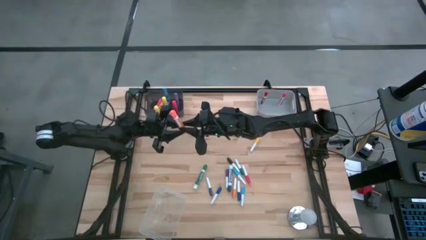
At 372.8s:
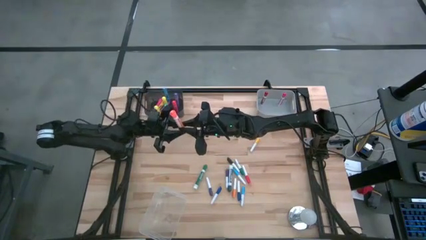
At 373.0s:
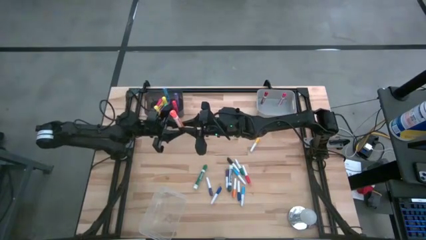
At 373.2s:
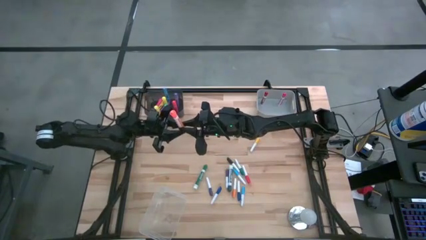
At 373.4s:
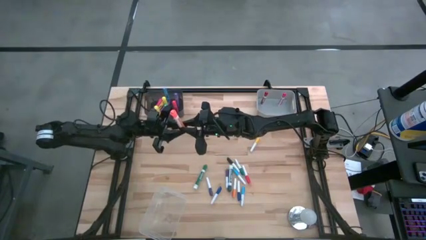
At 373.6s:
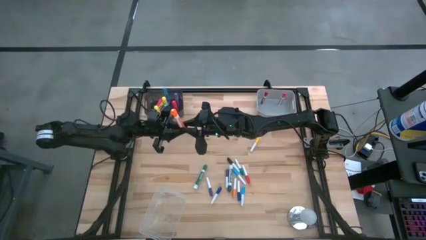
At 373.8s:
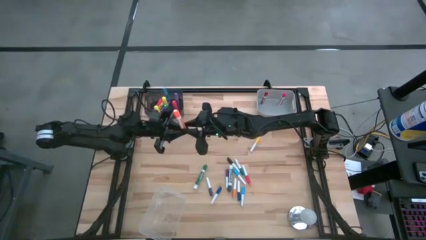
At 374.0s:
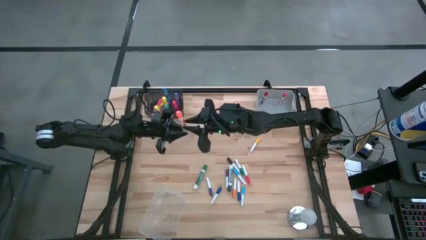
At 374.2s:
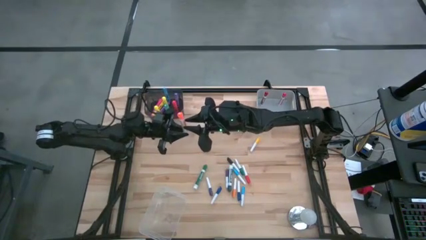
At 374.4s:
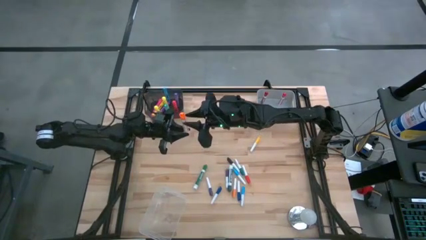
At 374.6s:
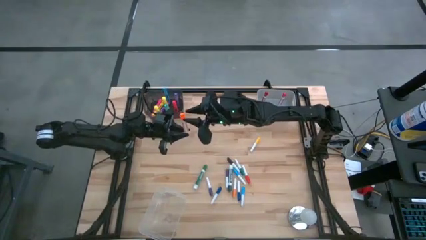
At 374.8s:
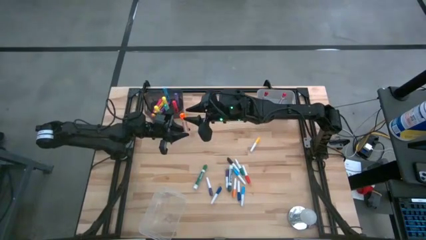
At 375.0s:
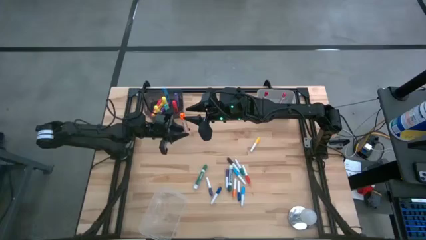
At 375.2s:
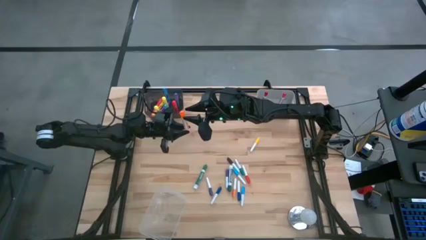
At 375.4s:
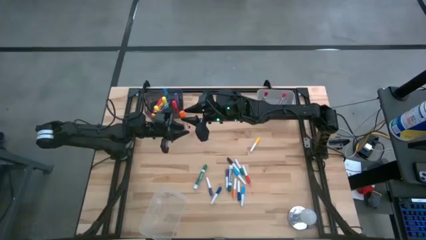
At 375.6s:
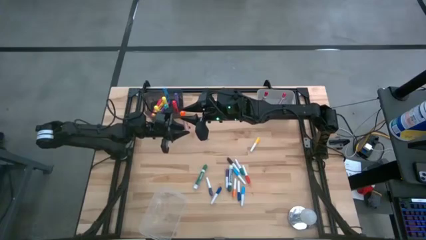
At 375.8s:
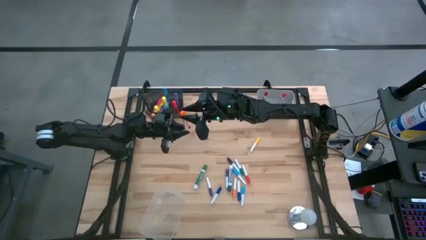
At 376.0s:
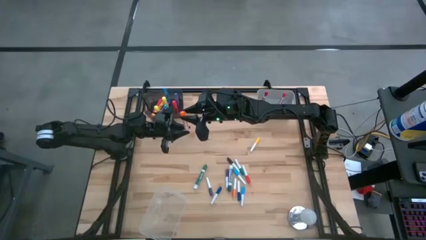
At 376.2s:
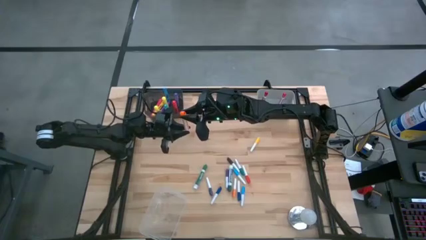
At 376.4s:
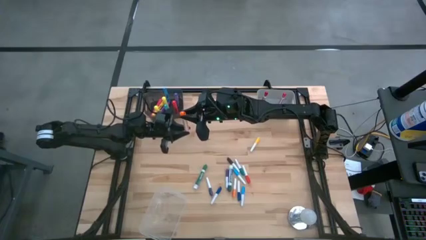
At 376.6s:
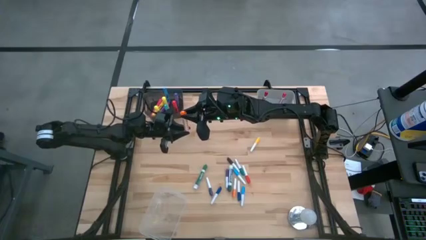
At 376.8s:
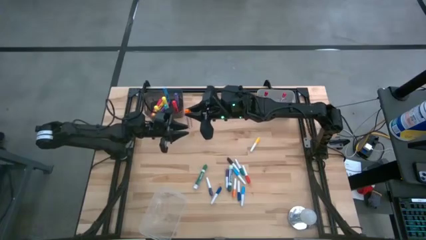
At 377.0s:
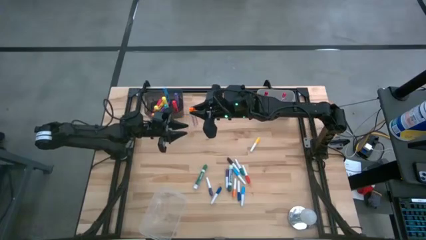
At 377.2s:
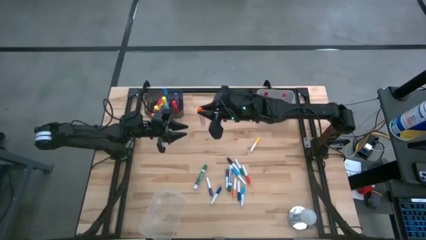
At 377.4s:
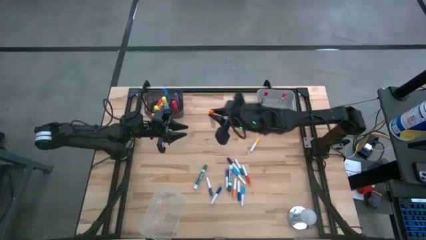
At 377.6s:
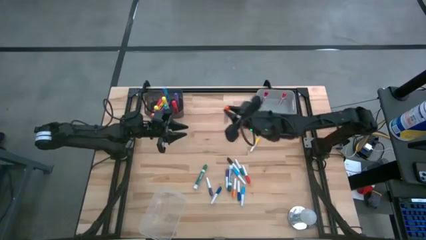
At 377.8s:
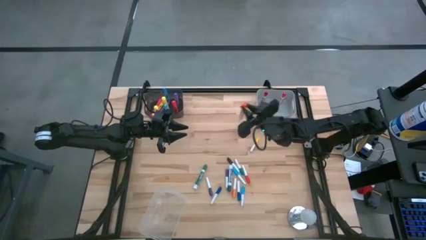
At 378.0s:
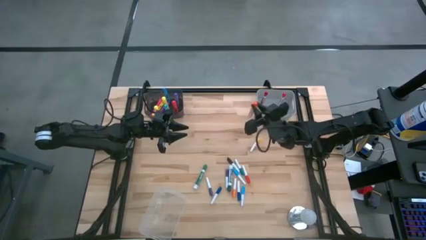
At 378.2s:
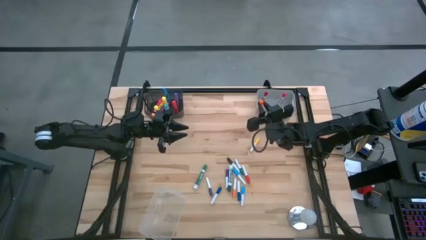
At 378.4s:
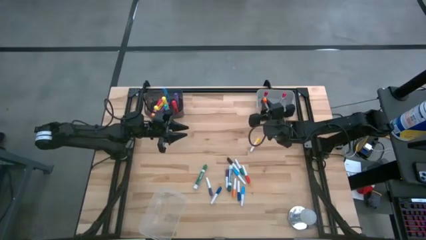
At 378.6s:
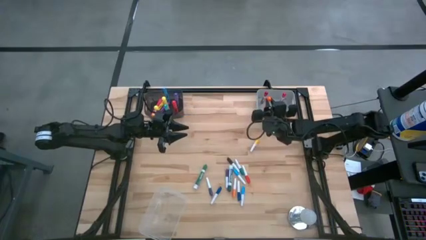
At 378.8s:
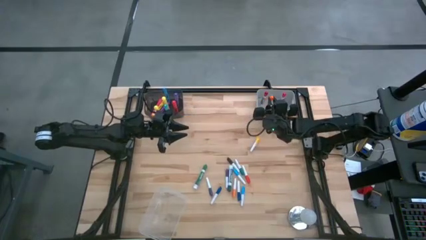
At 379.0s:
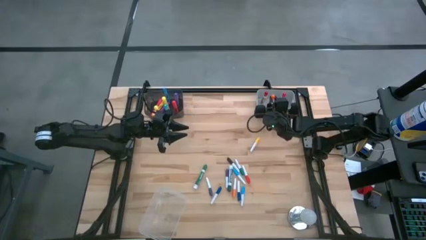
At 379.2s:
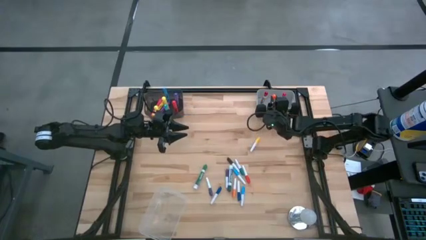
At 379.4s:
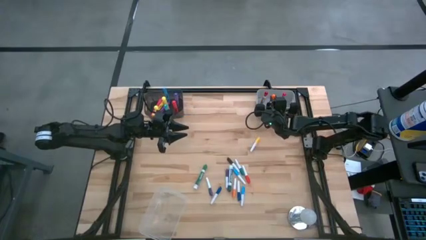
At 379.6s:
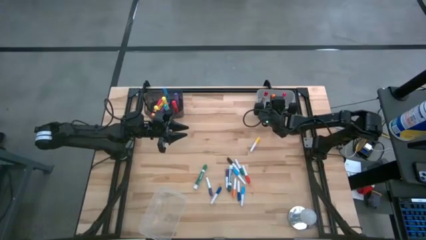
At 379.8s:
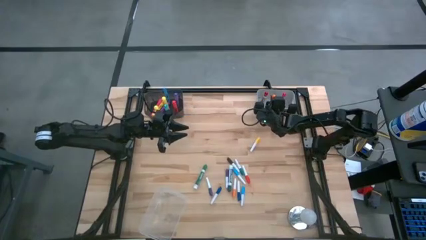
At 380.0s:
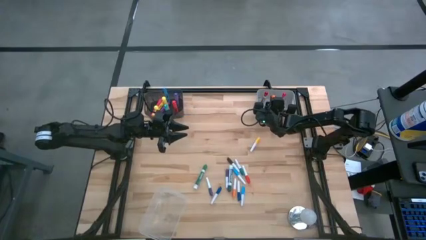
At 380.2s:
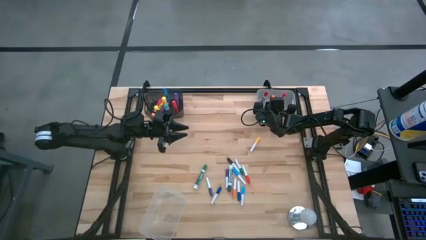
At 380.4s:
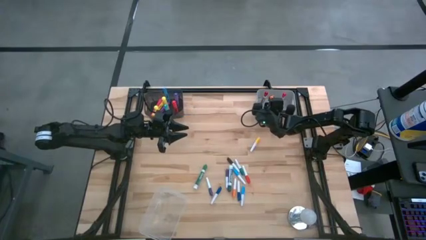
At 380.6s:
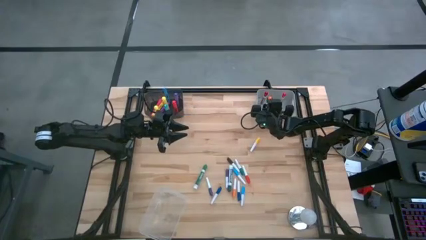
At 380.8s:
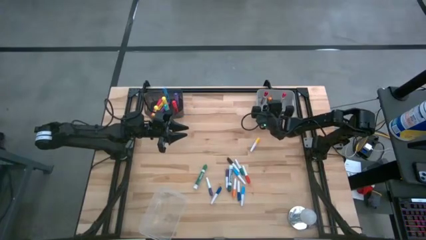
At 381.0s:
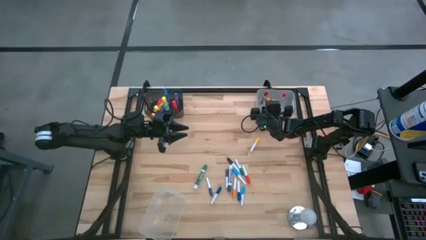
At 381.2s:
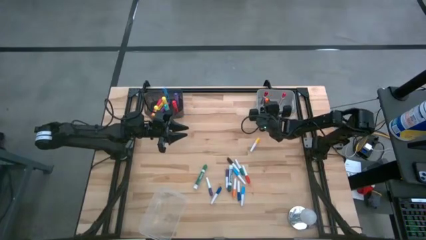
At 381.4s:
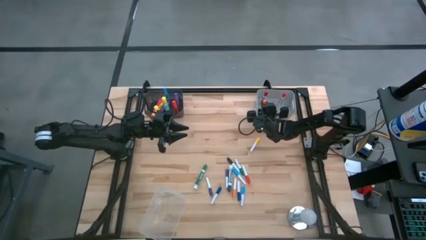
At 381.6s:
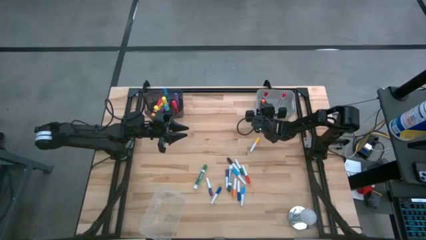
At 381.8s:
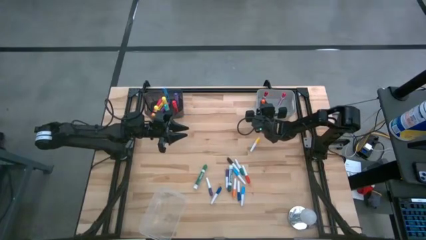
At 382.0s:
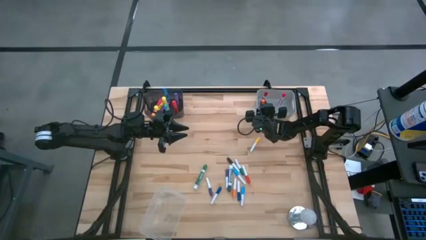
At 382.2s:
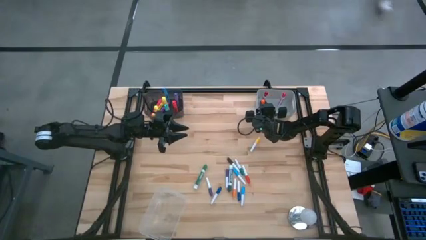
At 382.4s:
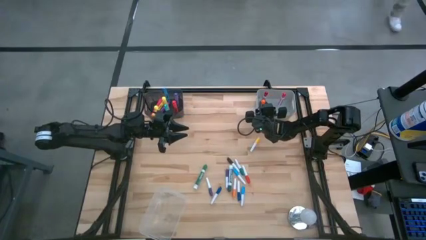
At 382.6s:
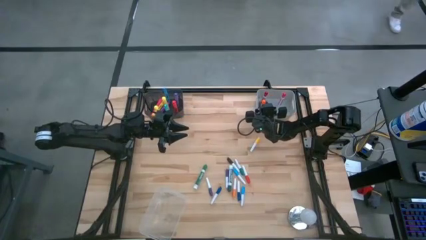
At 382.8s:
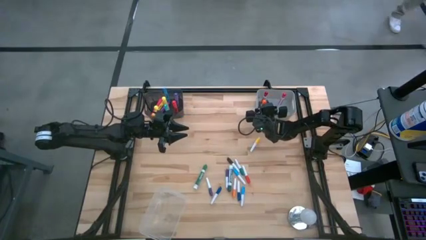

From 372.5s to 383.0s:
Task: Pick & Place Markers
Put the orange marker pen into the gray bin

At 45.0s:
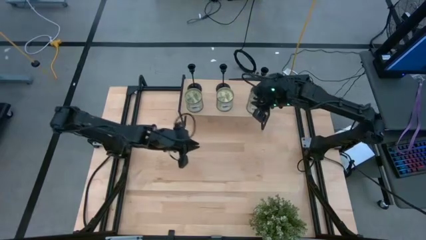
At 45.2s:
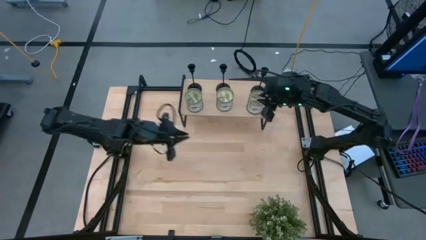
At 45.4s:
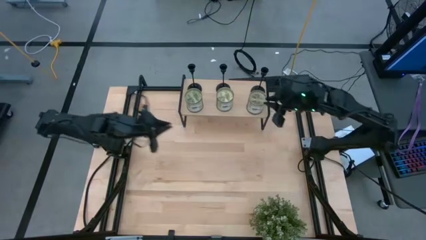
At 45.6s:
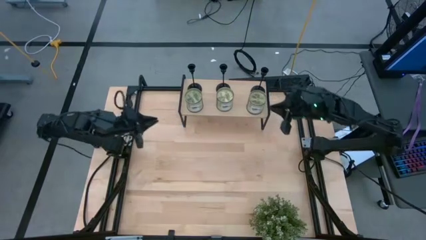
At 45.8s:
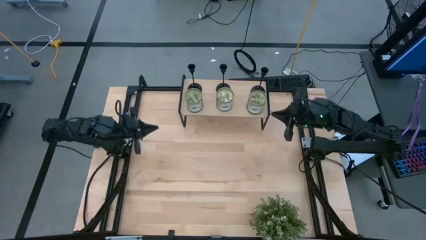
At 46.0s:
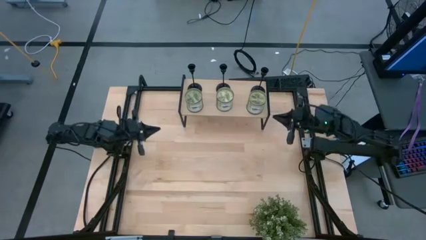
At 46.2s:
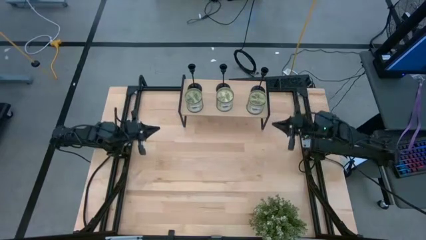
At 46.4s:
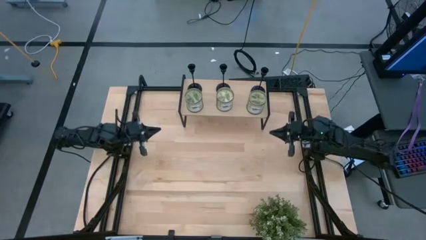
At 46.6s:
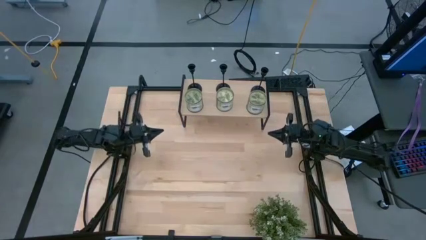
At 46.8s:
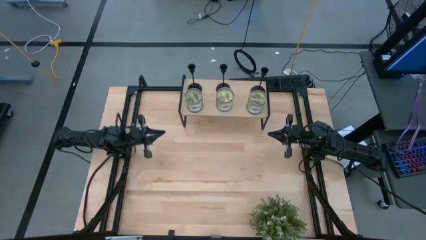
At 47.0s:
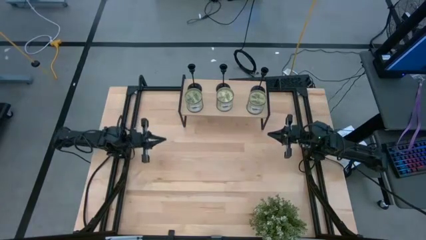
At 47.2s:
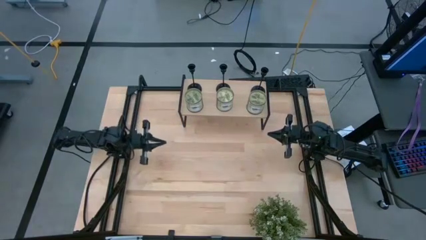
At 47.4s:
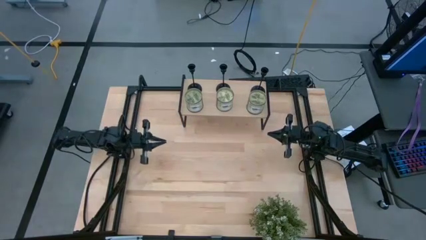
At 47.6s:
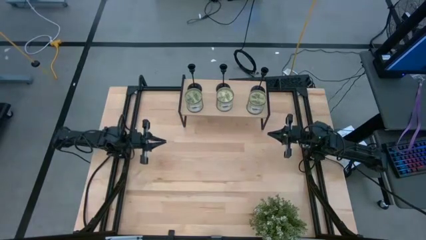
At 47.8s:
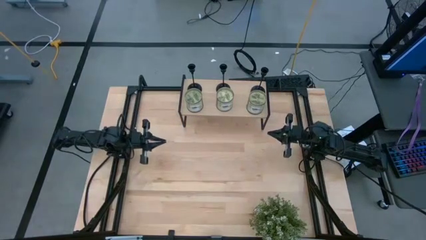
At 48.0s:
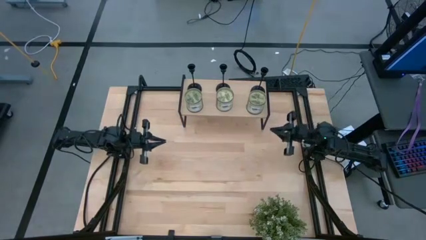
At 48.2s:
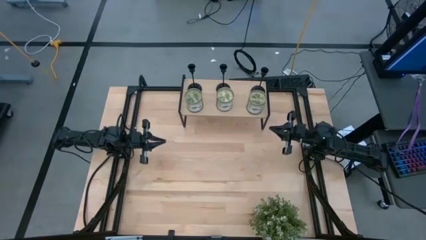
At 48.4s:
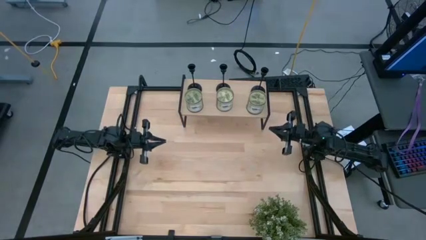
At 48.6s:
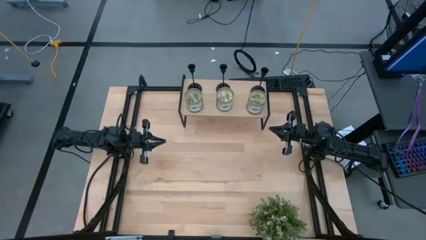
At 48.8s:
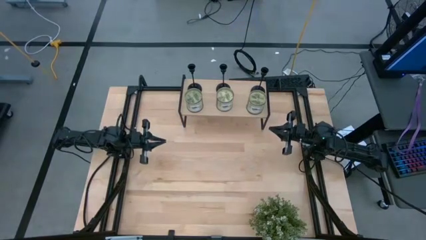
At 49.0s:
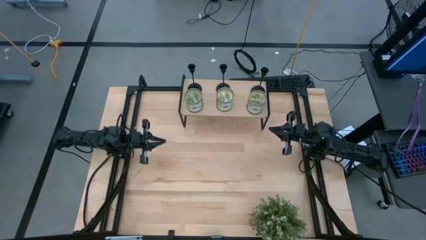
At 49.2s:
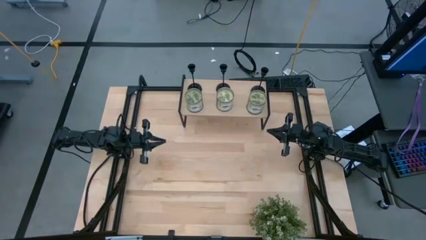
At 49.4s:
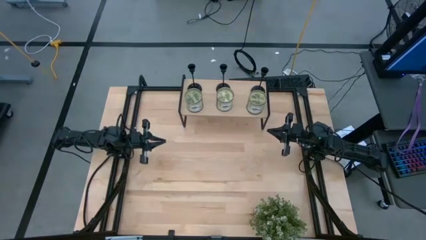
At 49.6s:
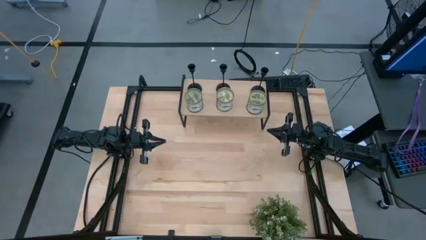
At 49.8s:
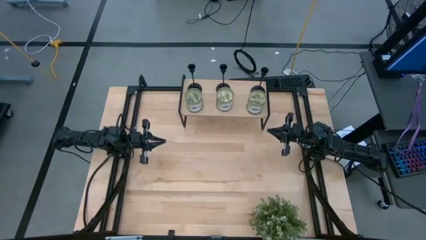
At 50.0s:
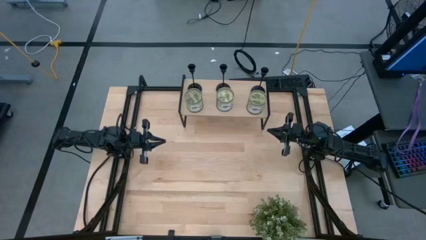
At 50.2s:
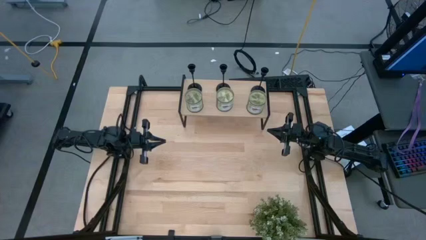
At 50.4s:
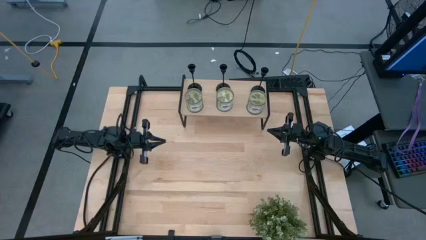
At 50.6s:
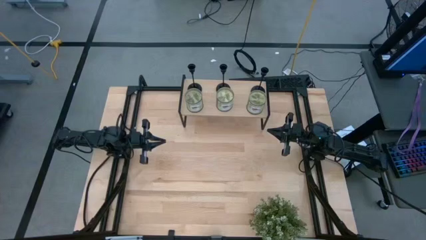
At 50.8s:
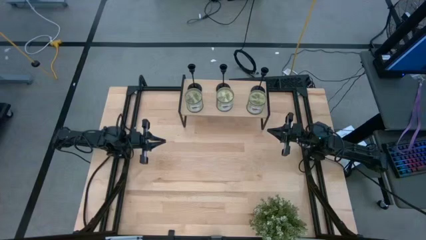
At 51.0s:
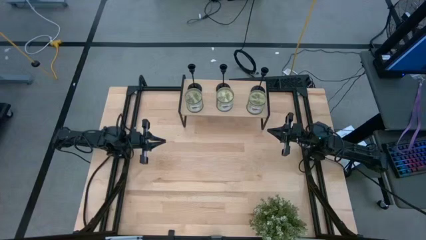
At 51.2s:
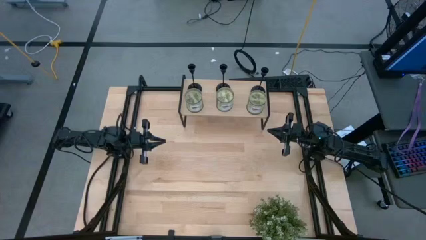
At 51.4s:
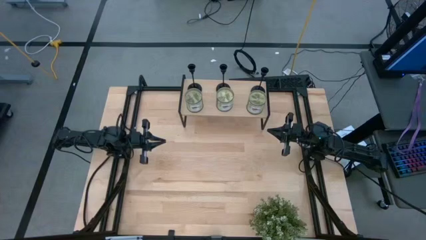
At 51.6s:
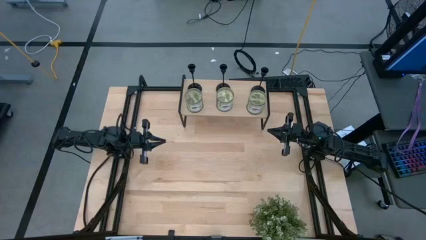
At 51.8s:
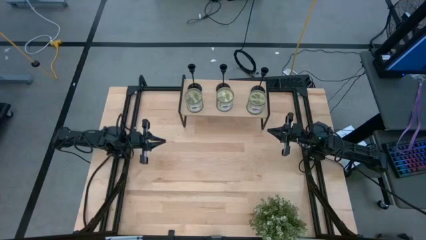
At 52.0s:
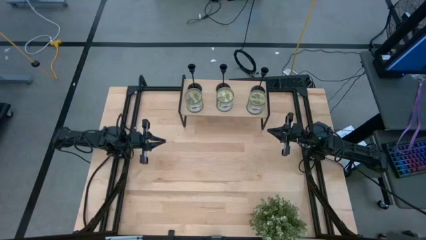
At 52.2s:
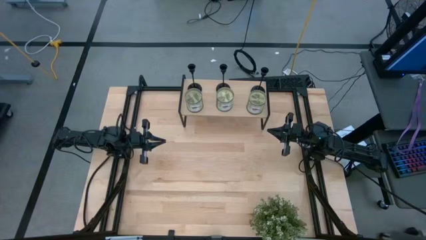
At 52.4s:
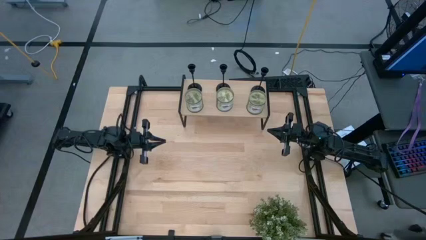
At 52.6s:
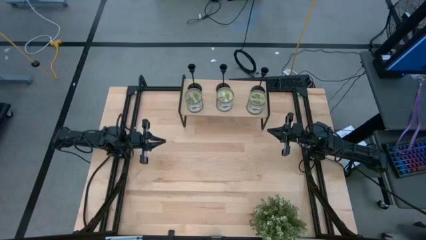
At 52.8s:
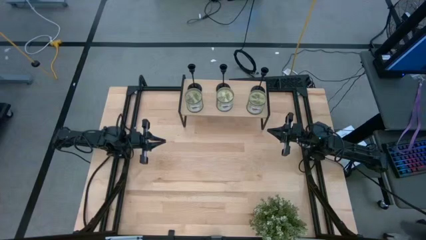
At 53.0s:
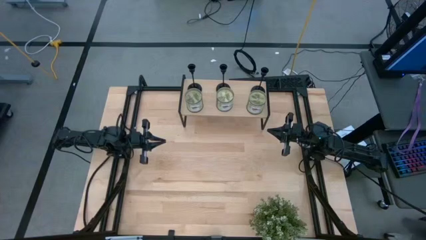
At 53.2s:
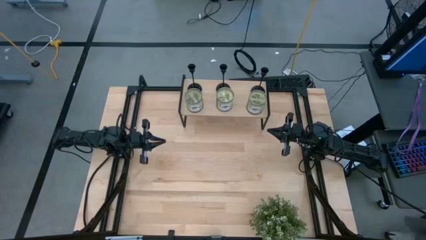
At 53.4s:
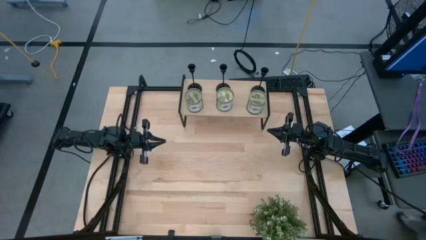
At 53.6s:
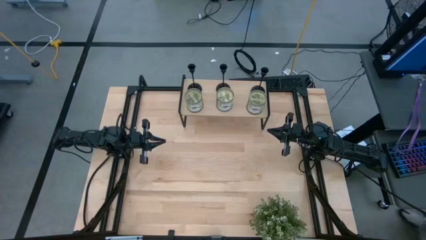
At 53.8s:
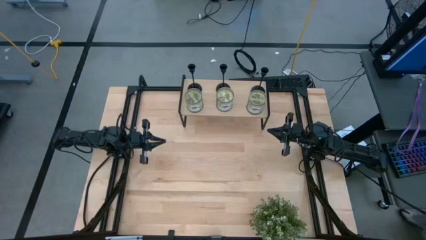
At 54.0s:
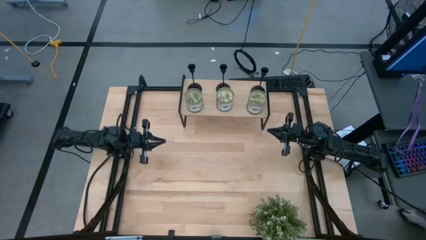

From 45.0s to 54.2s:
Task: Pick & Place candle stick holders
Return to Home Position
